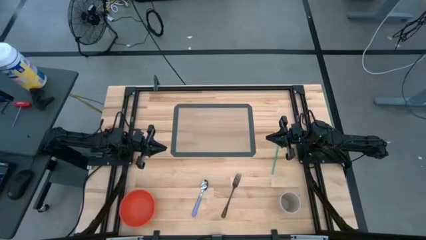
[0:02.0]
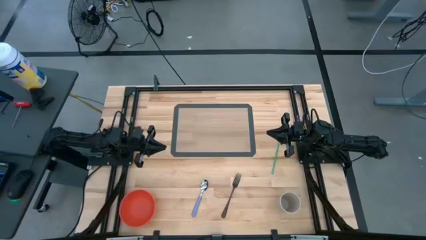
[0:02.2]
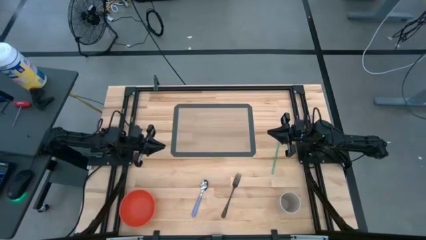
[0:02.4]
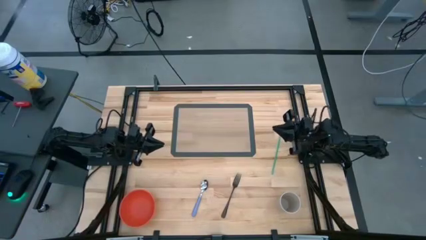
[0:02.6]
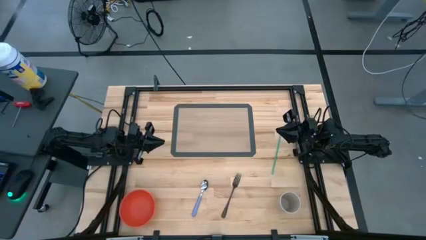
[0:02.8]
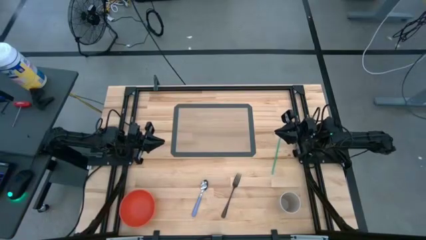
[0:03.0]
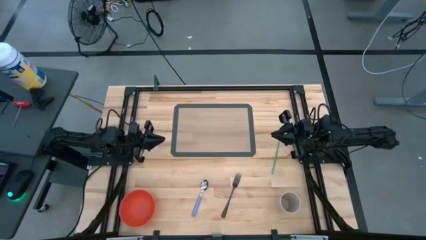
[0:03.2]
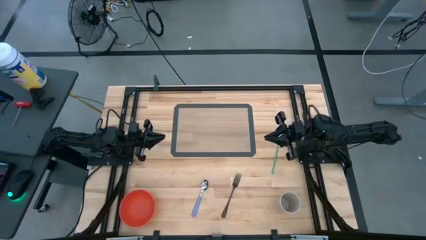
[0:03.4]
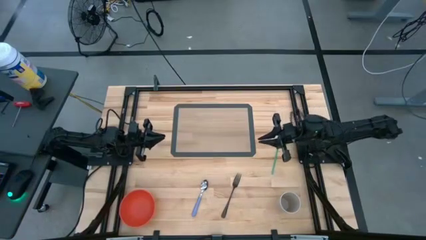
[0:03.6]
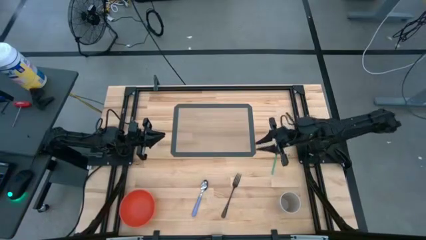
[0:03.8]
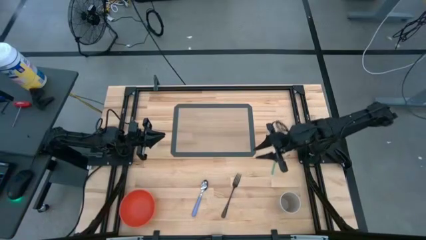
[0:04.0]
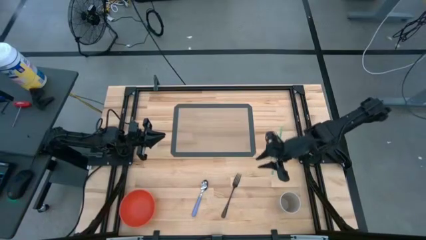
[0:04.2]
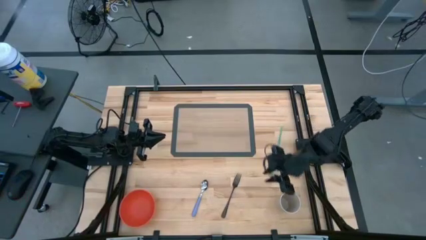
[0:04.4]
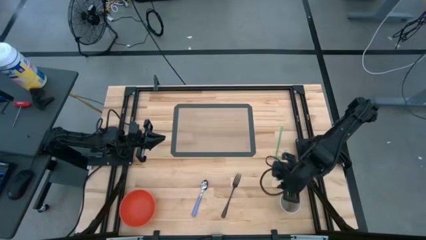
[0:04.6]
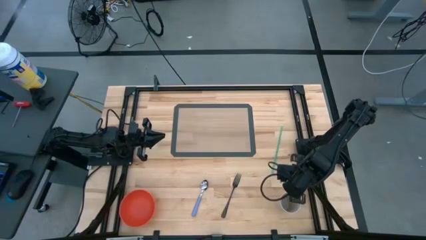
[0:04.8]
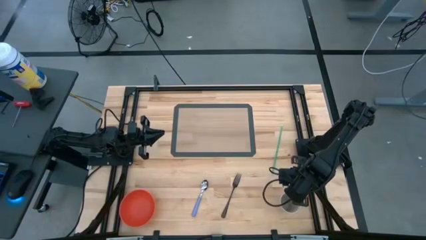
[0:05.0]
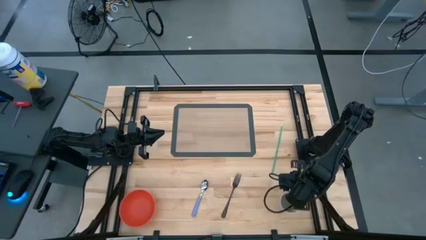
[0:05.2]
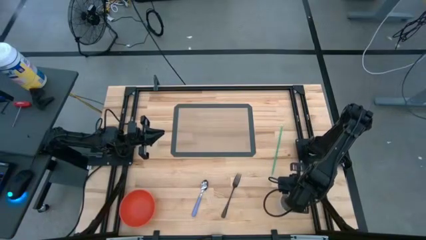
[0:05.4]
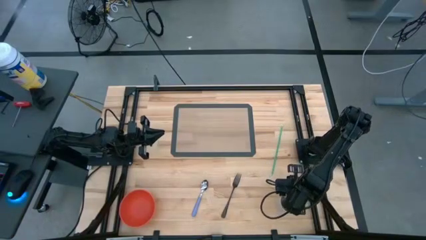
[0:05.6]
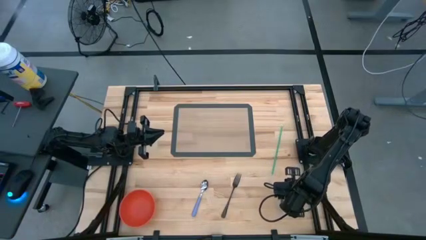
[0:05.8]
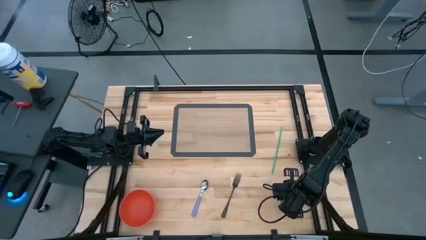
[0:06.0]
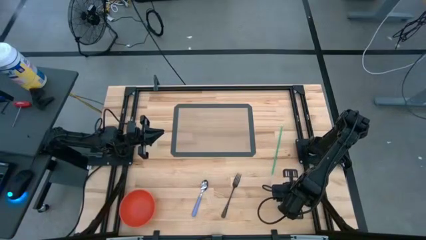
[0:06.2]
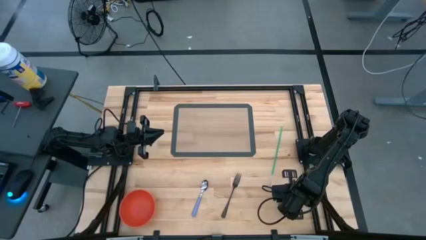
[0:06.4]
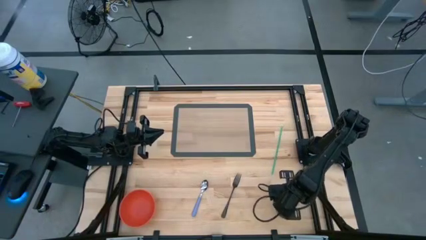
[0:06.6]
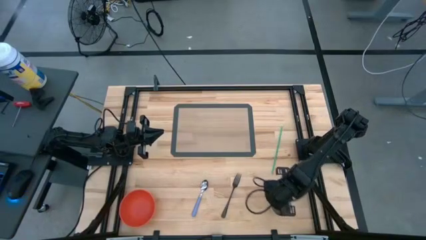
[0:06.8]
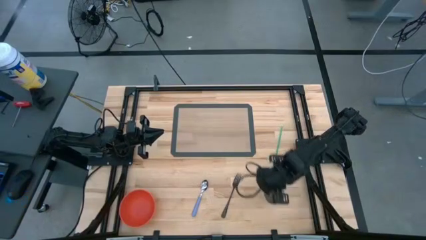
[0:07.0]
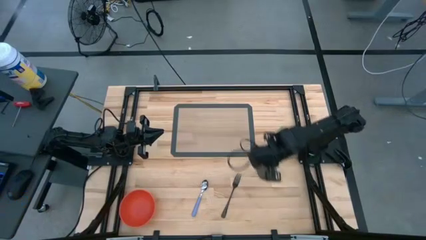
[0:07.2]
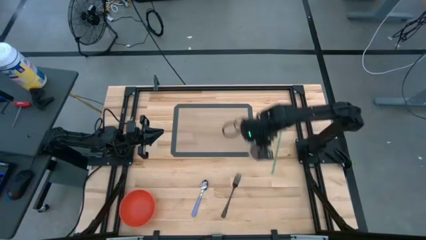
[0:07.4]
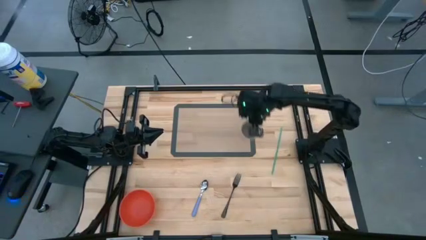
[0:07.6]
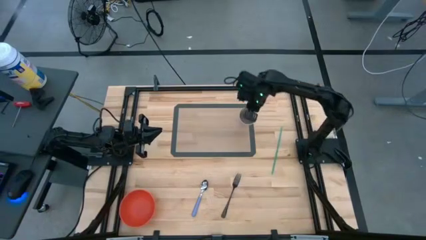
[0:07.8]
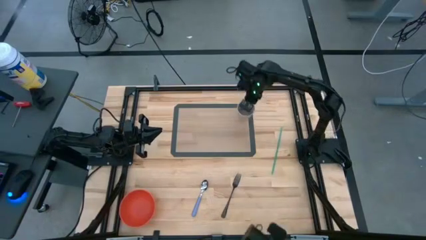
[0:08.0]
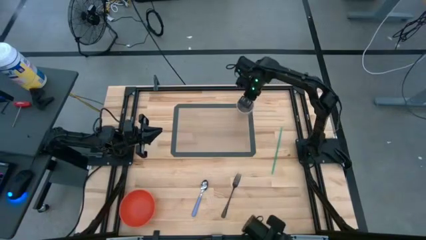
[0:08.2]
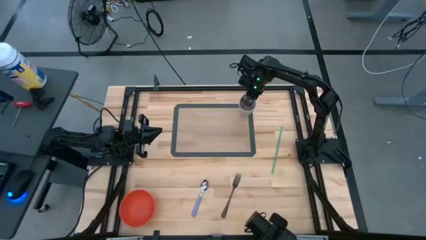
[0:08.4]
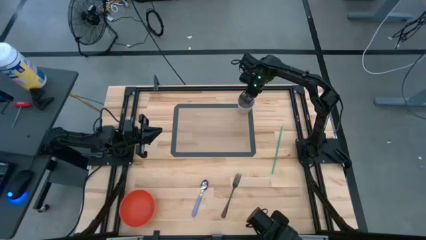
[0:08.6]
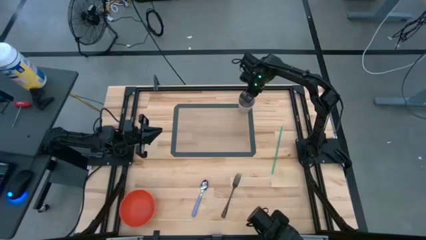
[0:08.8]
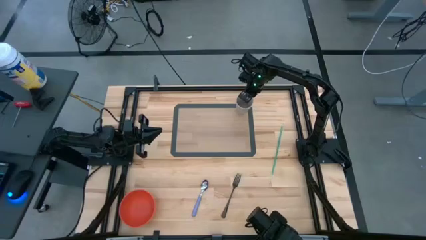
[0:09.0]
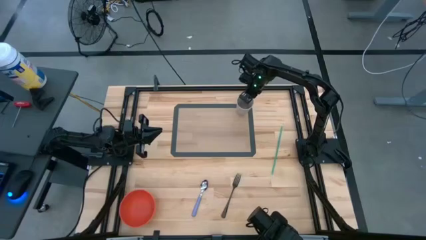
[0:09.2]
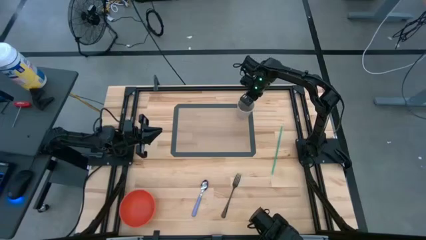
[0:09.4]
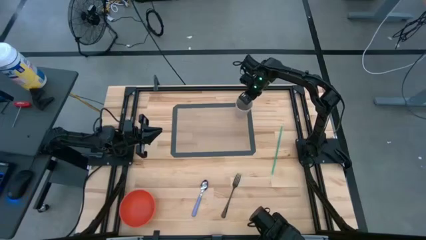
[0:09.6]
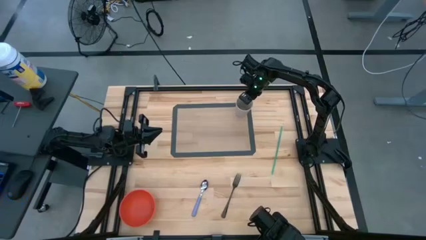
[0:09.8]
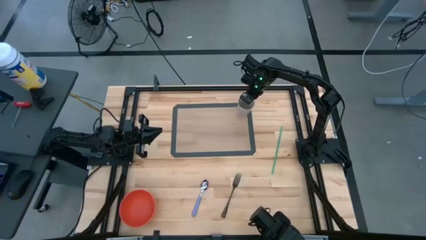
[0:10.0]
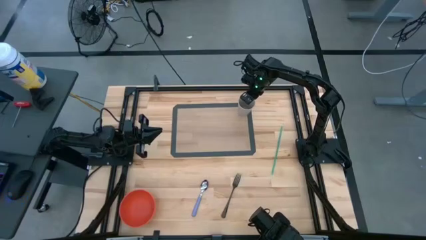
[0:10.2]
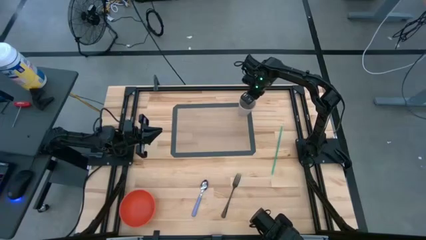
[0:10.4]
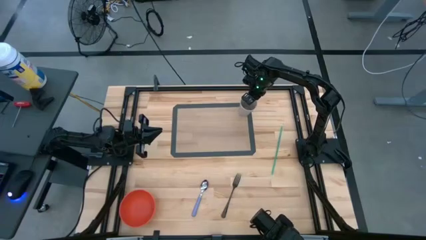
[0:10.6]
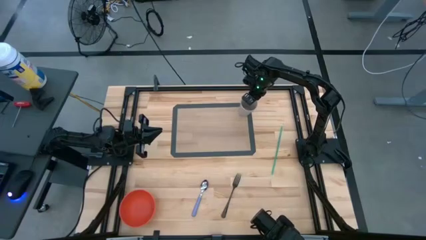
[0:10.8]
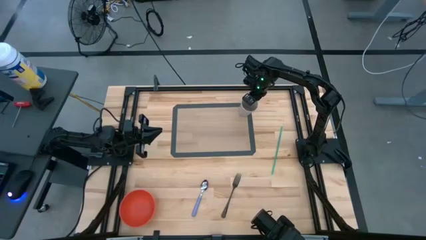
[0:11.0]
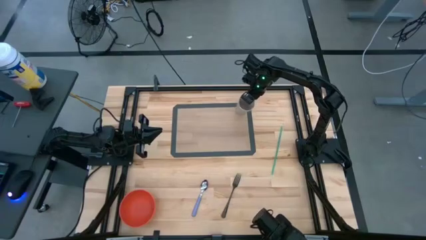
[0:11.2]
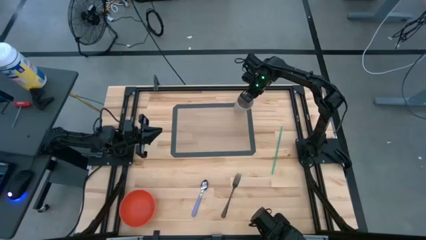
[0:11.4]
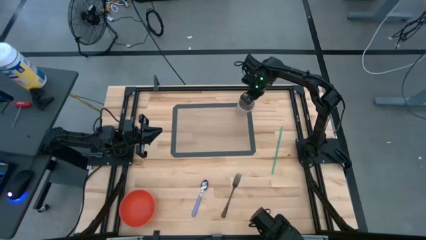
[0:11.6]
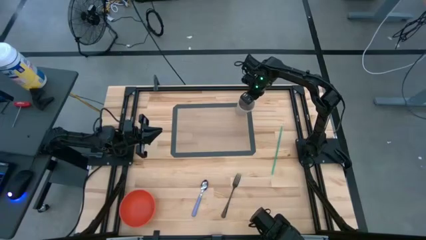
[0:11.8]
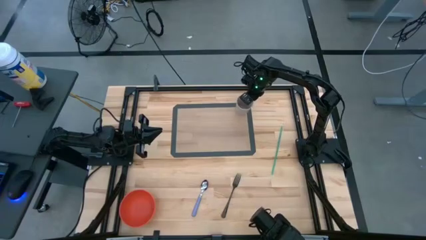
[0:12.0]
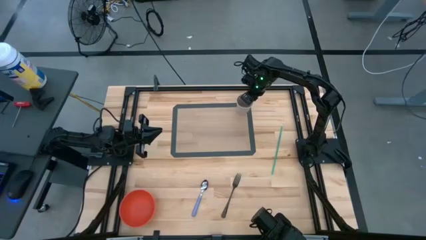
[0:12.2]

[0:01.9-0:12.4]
Task: Pick & Place Utensil
Put the white cup on the top right of the mat
